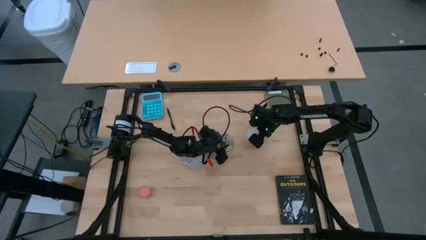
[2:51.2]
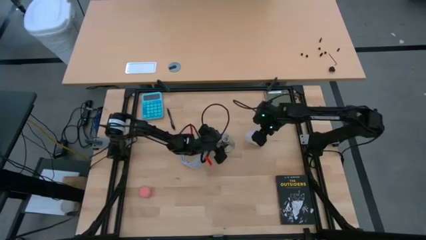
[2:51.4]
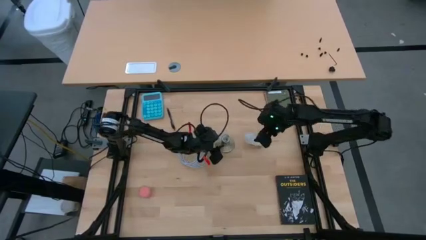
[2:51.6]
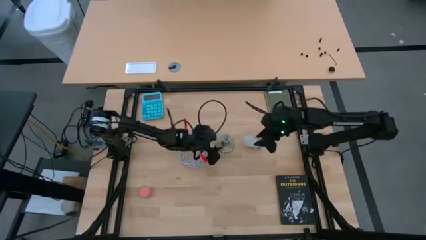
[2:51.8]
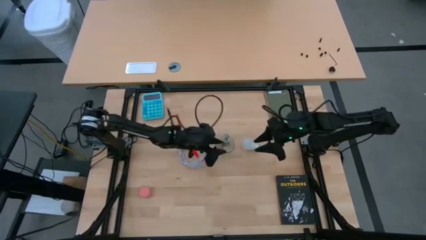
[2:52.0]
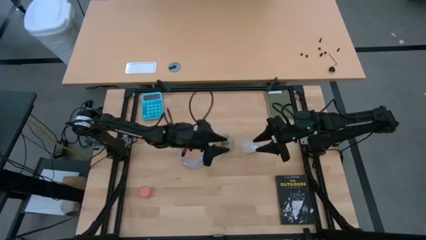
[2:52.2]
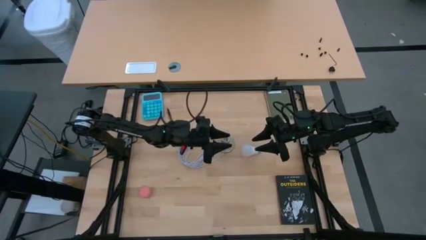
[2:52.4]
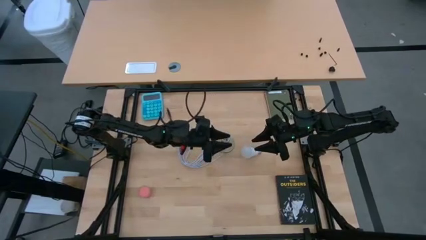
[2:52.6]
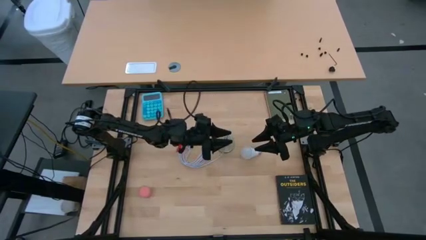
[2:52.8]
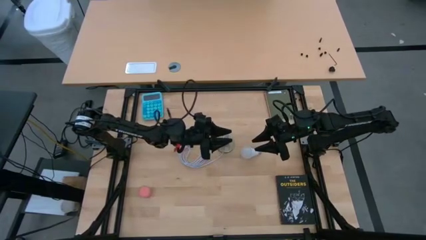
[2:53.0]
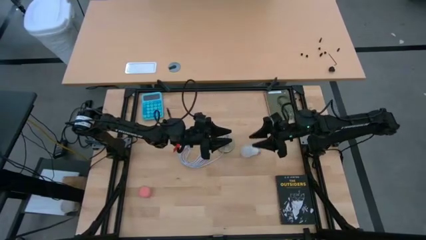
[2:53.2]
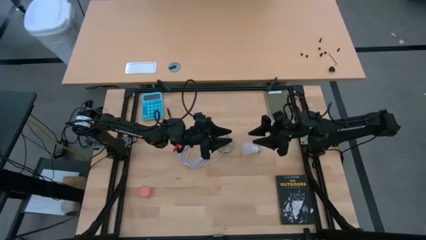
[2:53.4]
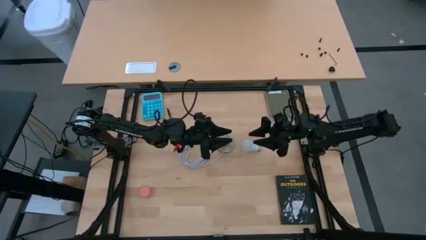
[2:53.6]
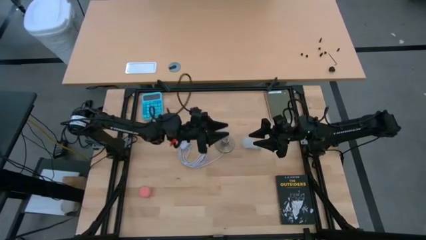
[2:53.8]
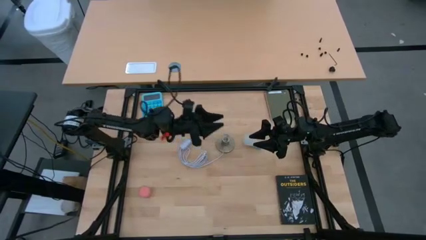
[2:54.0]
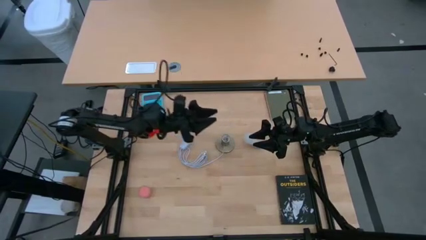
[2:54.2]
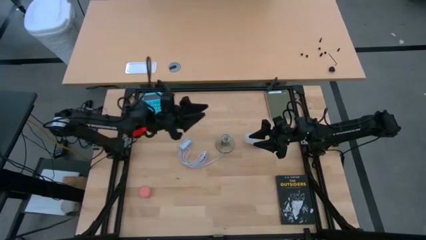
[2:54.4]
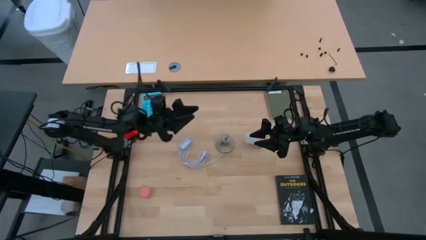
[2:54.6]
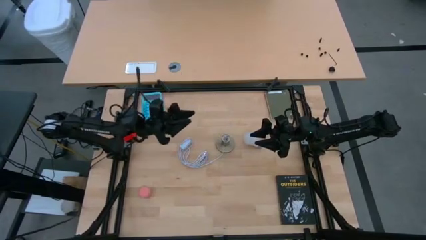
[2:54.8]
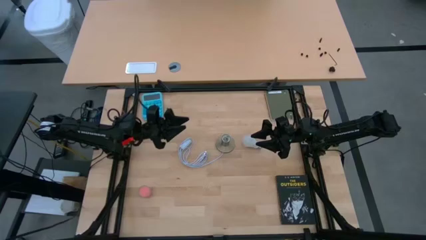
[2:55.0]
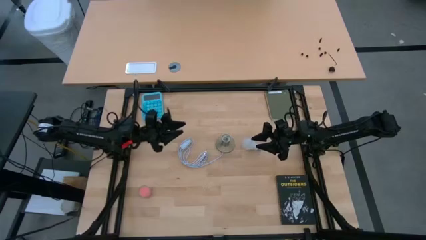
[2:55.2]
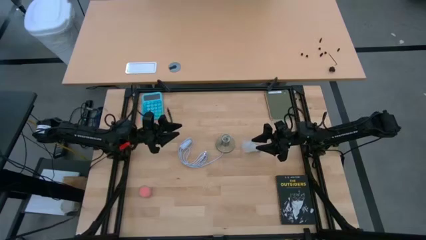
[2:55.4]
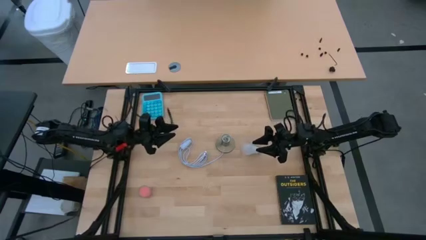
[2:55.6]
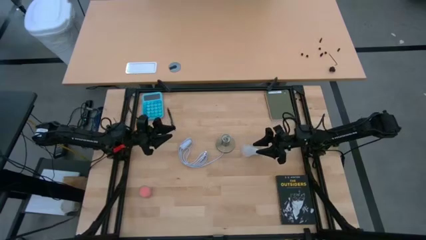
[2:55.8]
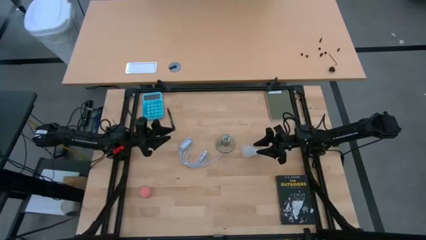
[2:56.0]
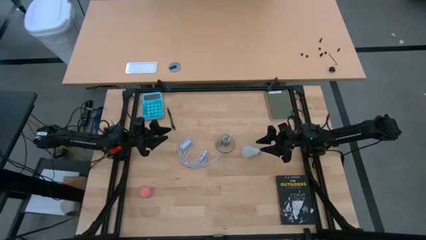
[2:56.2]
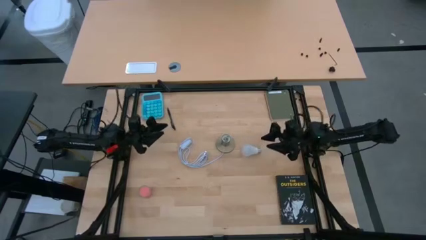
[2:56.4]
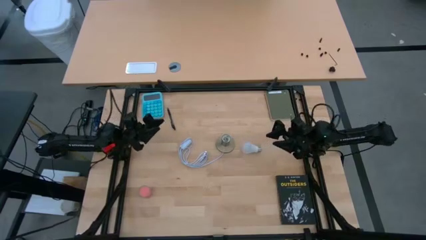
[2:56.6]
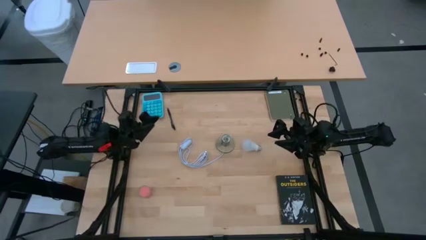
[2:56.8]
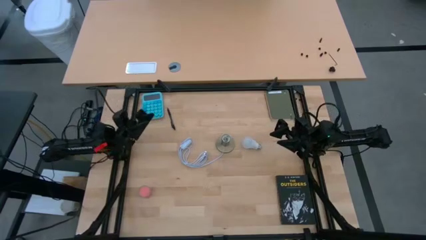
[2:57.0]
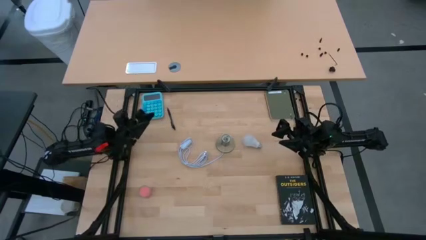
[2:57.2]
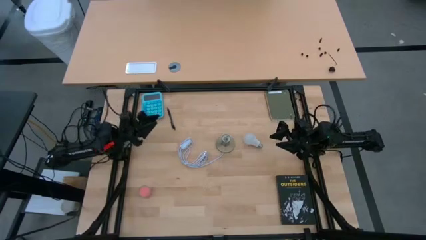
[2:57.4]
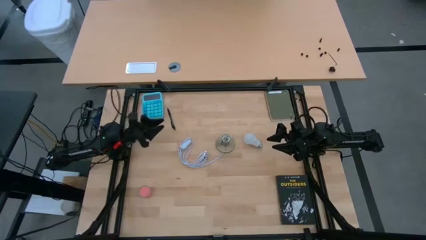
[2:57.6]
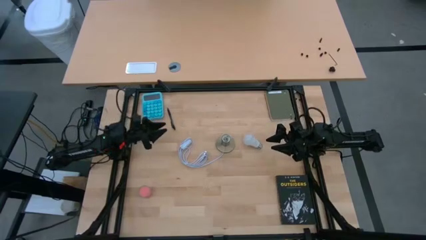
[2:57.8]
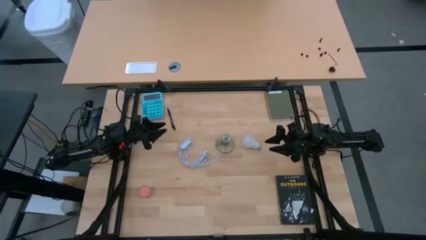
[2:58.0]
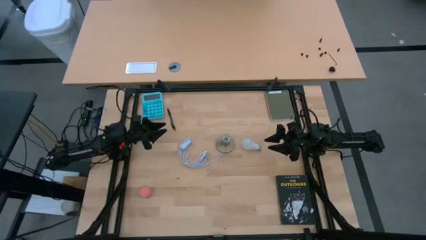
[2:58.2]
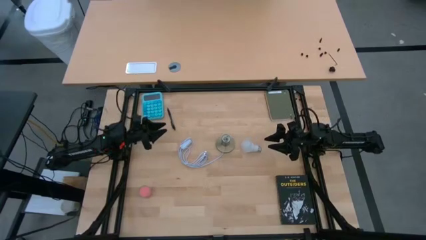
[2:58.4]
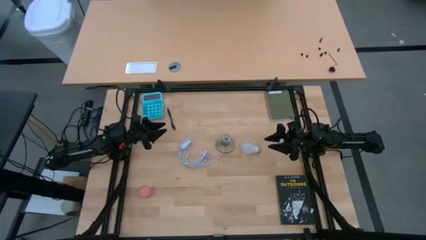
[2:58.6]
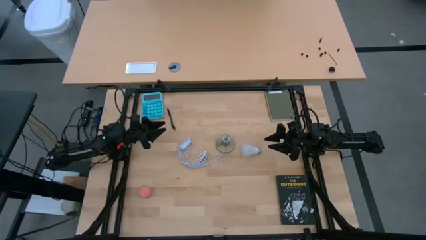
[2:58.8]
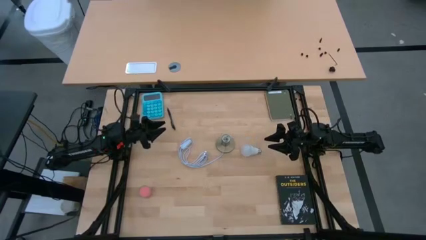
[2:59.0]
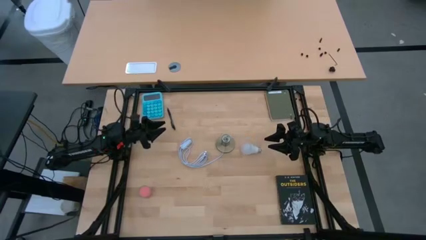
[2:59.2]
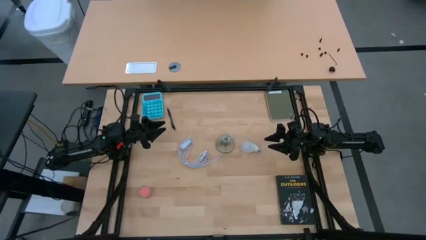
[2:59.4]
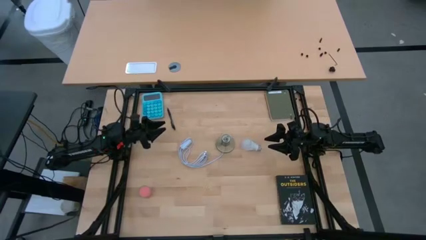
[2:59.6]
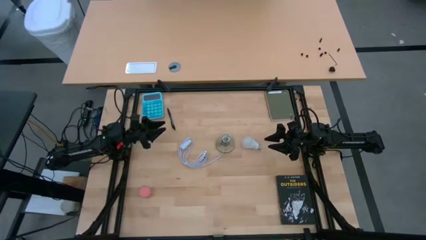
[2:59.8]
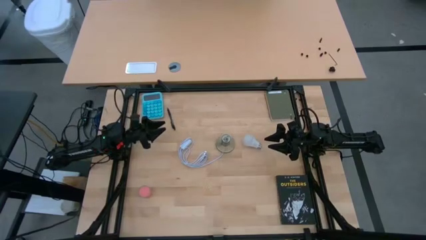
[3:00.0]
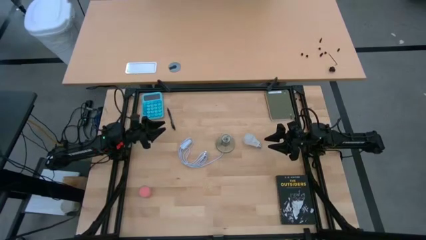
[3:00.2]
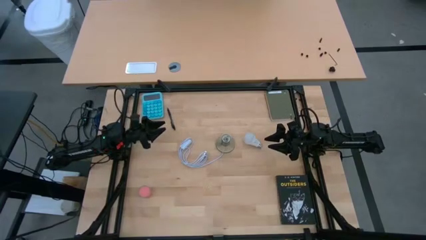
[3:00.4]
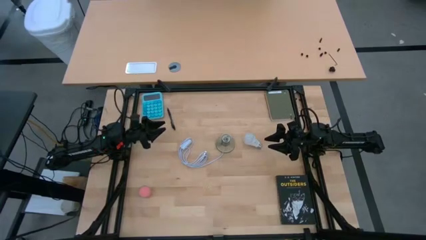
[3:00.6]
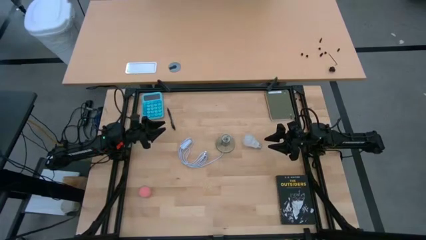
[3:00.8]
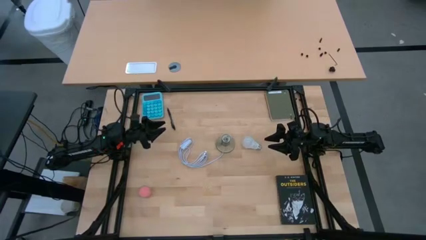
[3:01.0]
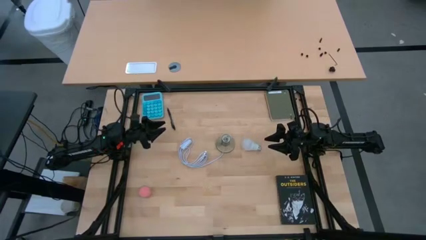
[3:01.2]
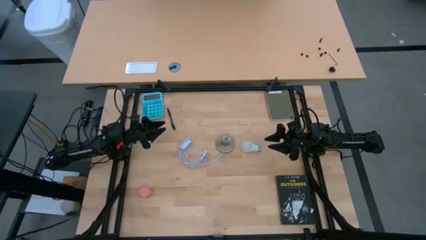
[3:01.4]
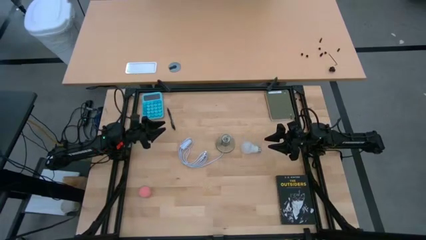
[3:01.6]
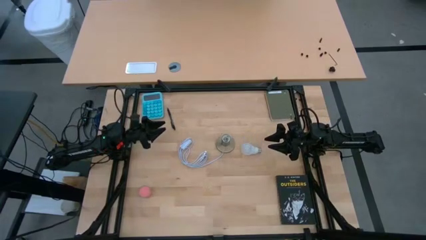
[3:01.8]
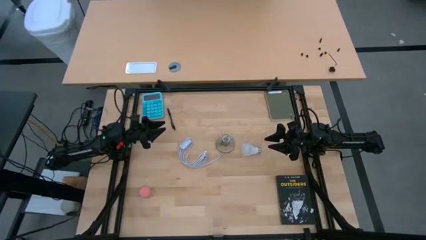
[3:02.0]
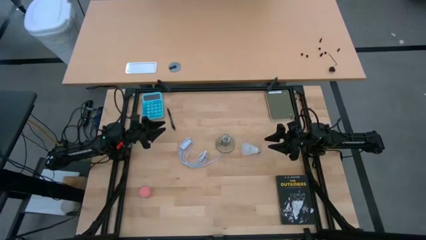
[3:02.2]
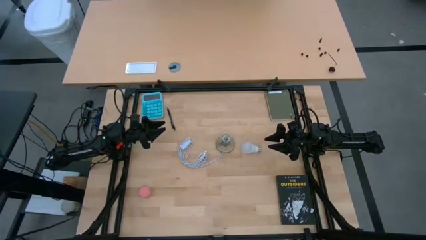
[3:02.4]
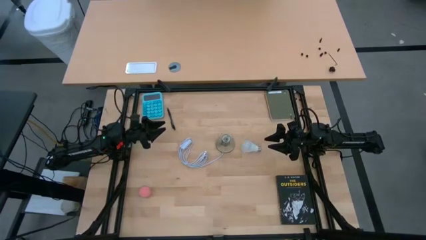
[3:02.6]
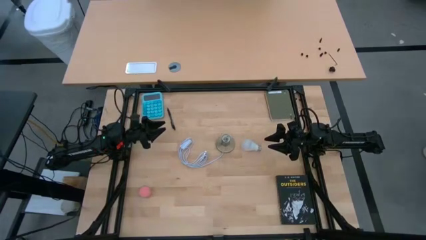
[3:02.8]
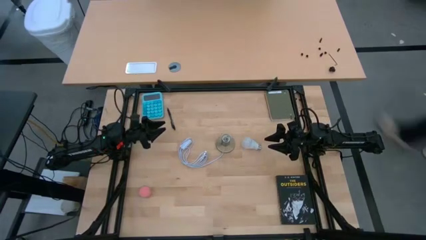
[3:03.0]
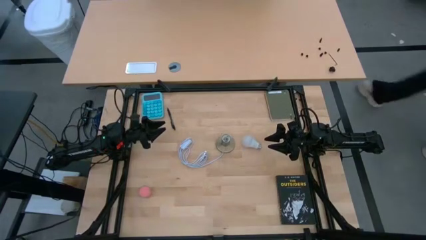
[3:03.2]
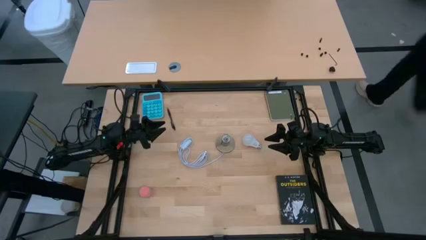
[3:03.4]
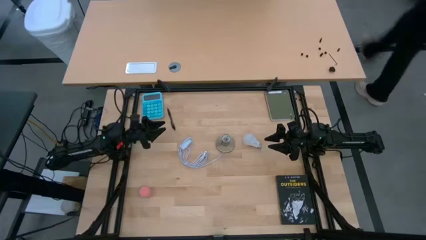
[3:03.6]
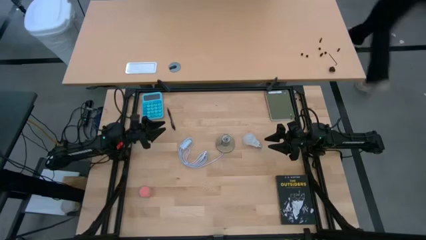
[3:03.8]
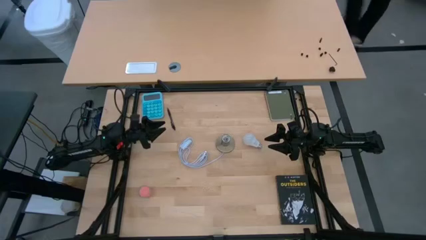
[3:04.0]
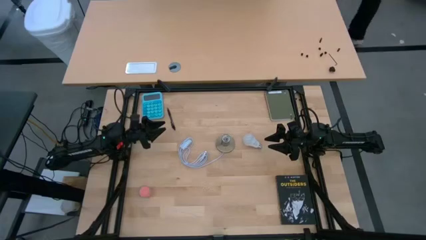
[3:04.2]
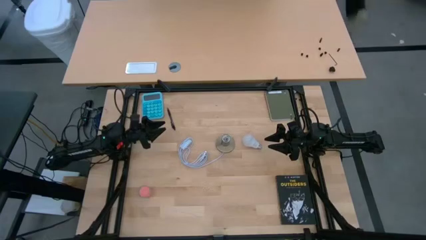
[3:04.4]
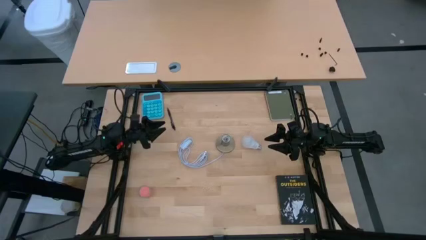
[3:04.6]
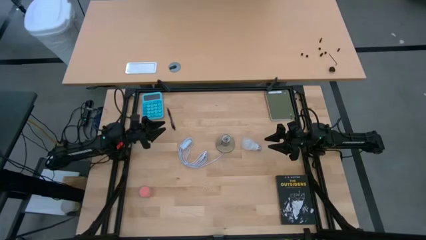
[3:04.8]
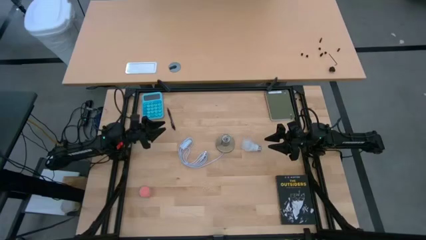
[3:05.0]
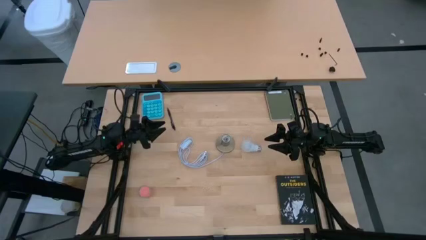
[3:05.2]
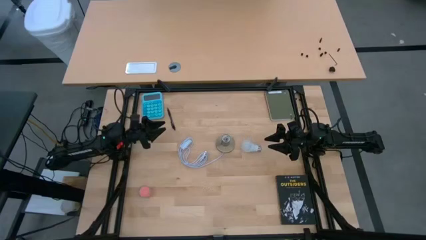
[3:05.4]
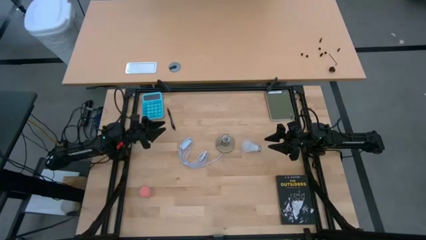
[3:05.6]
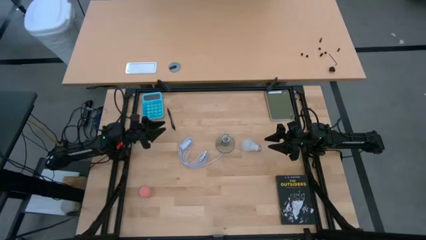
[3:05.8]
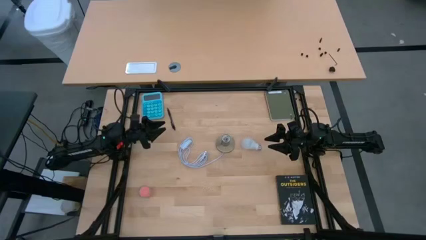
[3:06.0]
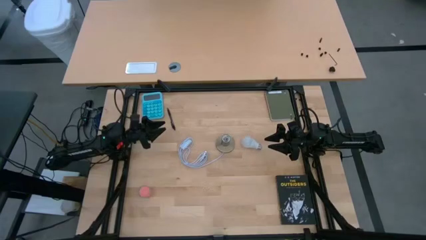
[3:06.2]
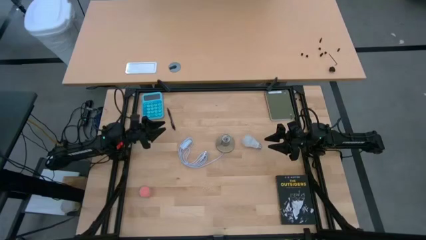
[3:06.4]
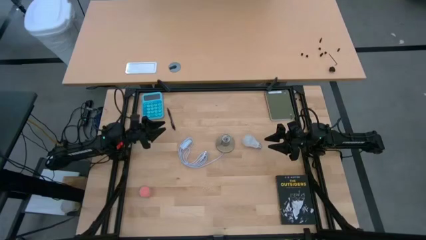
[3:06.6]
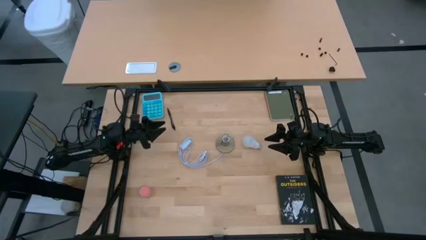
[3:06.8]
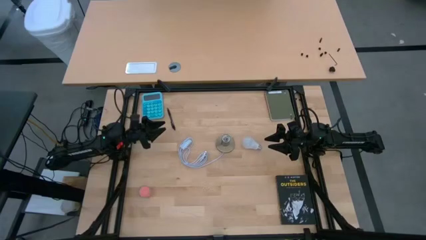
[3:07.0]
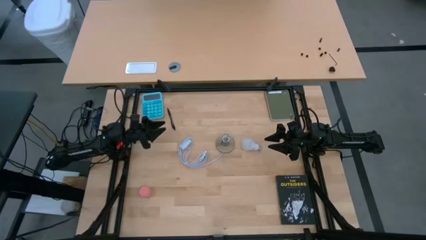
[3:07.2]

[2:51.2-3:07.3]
Task: Screw lightbulb
Return to Home Position

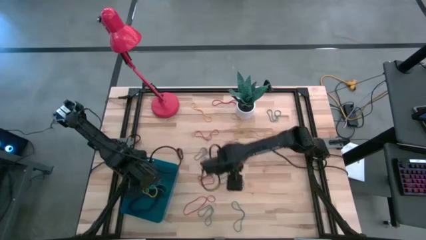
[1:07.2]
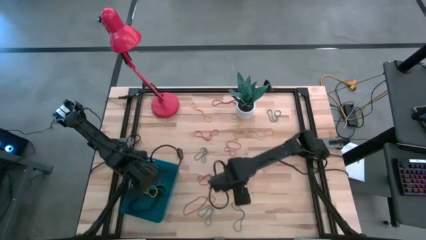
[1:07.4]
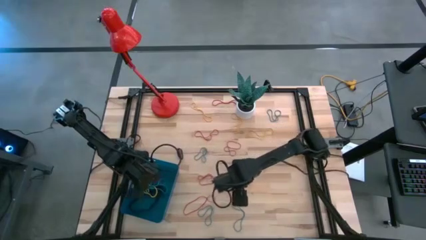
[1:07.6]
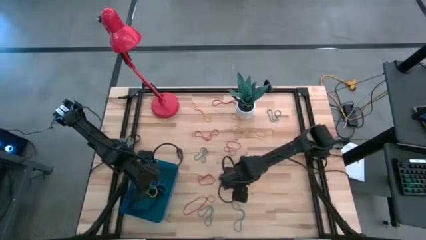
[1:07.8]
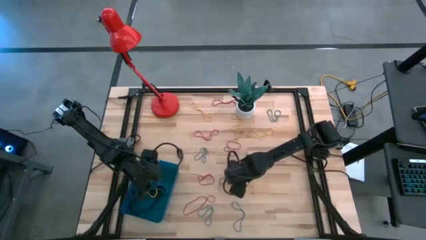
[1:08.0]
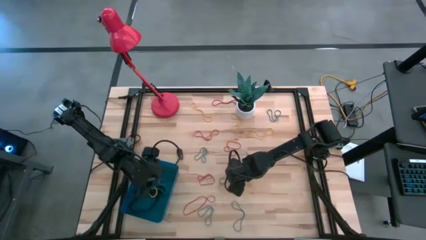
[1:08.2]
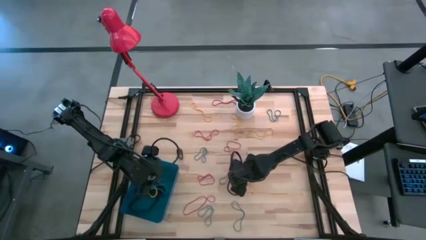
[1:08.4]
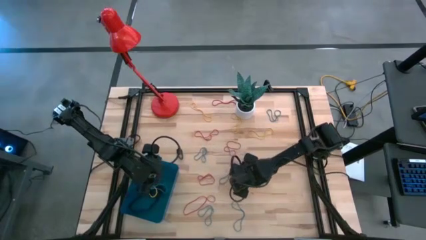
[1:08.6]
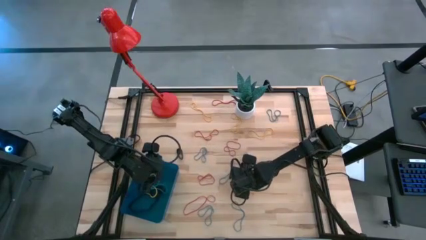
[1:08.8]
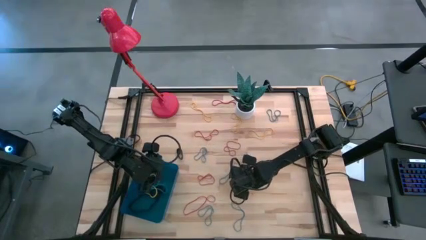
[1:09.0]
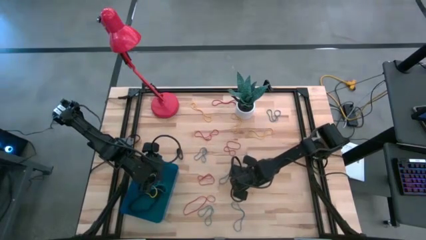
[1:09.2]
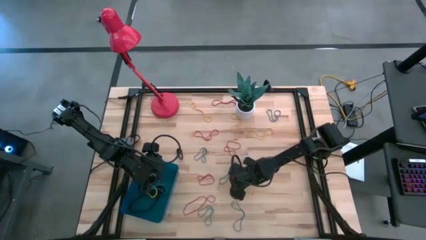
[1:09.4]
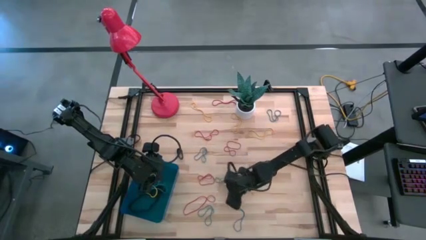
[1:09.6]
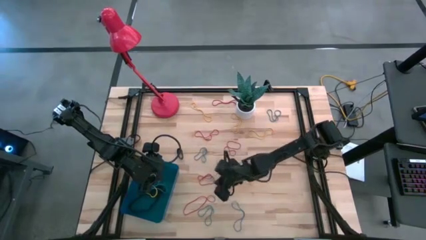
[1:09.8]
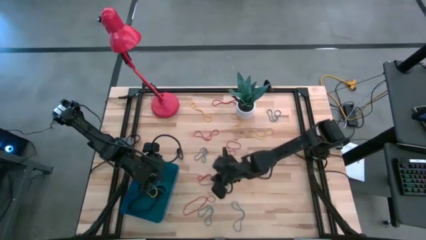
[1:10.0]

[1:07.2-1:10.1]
Task: Pick and place rubber bands into bin
Put the blue rubber band into the blue bin
